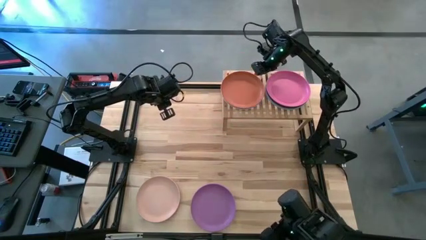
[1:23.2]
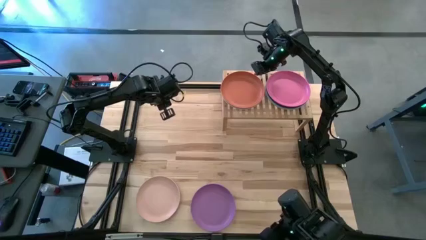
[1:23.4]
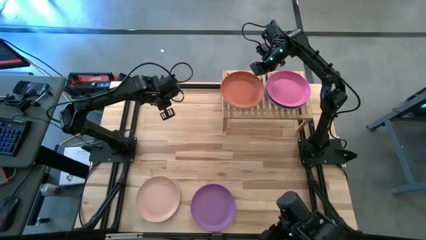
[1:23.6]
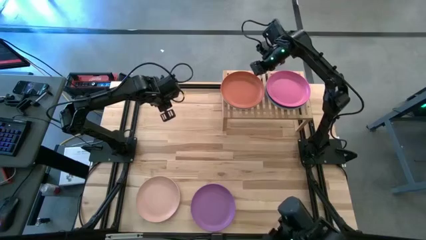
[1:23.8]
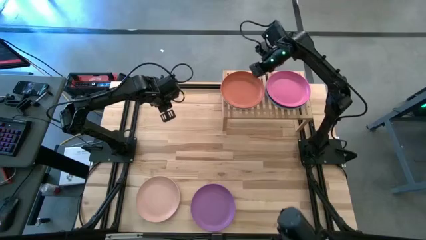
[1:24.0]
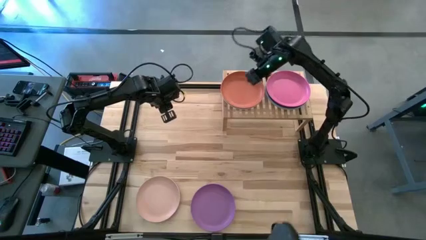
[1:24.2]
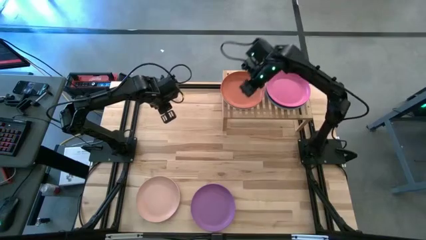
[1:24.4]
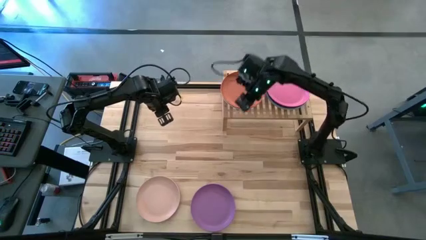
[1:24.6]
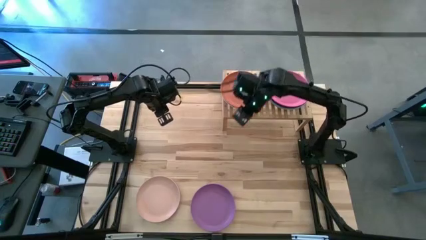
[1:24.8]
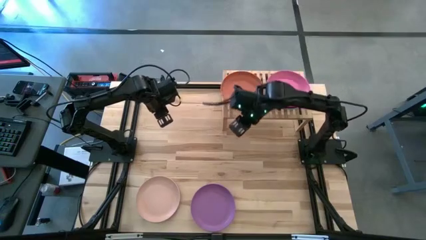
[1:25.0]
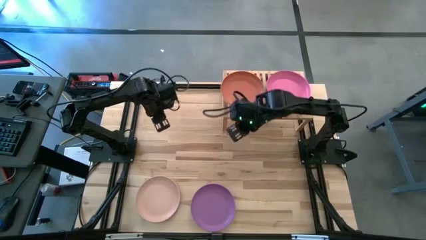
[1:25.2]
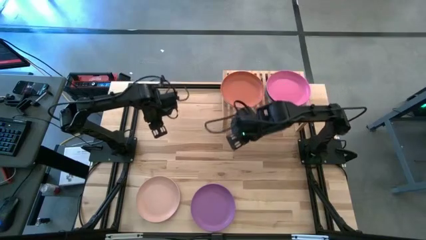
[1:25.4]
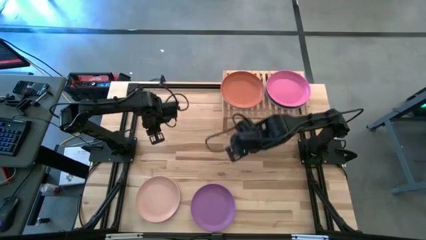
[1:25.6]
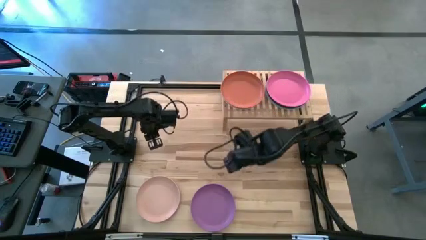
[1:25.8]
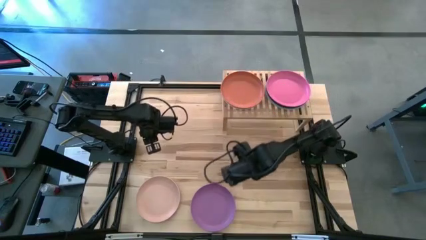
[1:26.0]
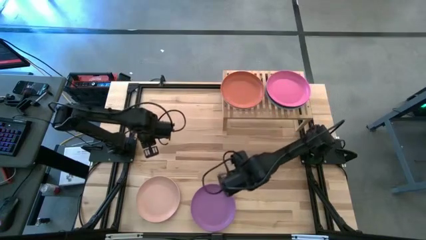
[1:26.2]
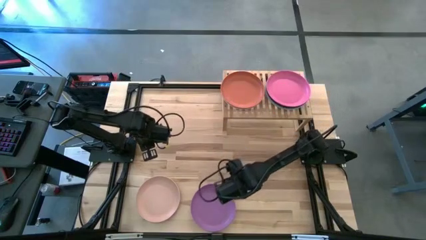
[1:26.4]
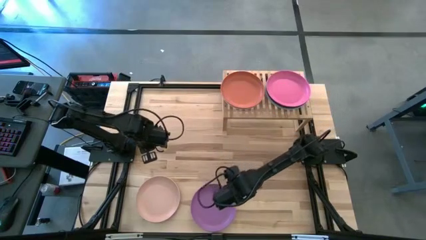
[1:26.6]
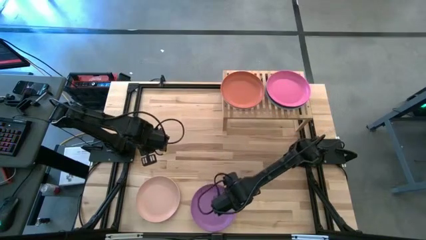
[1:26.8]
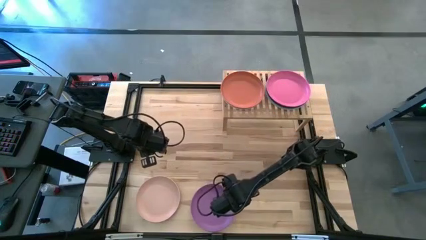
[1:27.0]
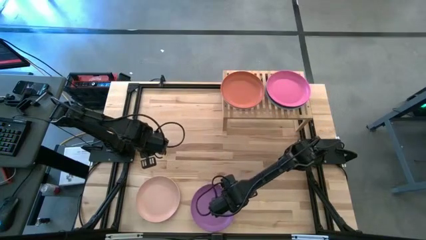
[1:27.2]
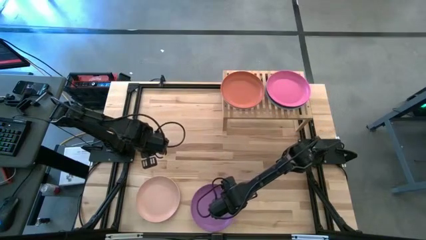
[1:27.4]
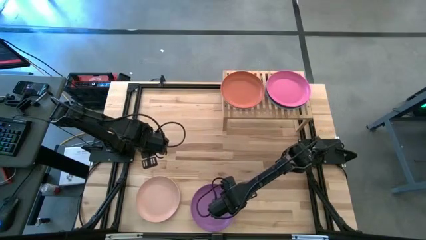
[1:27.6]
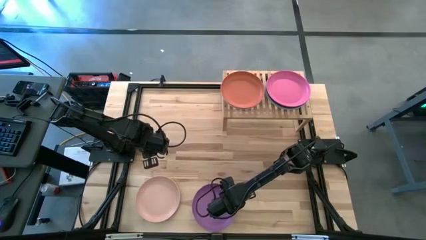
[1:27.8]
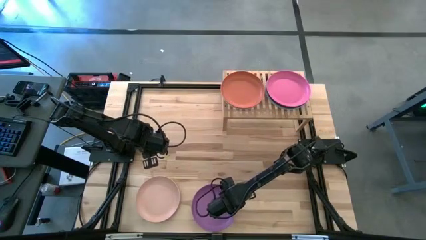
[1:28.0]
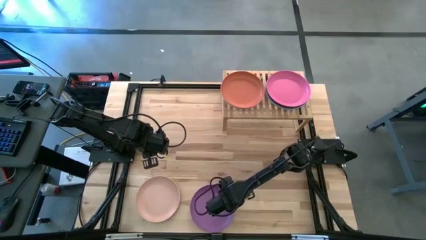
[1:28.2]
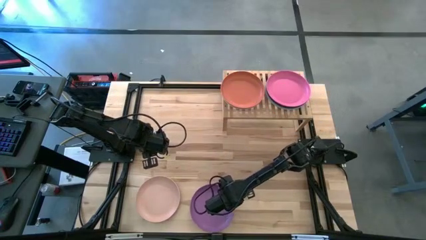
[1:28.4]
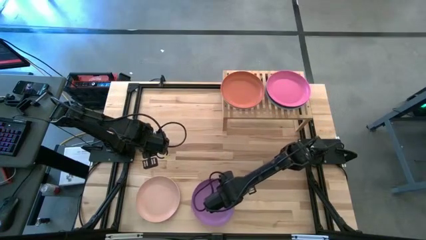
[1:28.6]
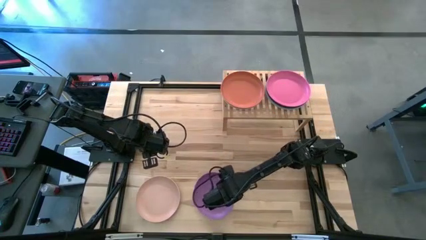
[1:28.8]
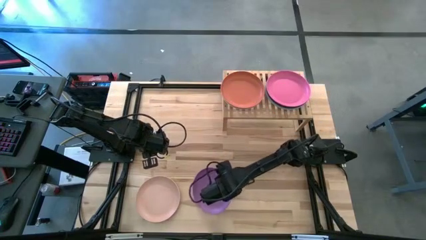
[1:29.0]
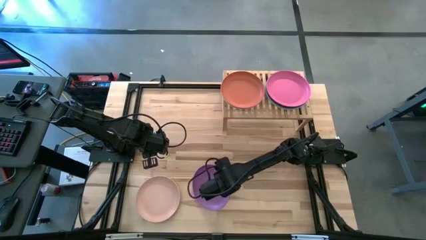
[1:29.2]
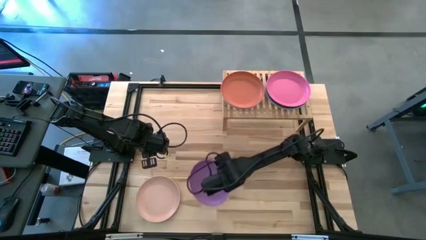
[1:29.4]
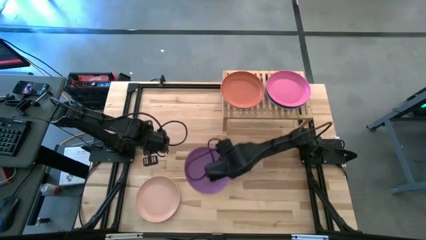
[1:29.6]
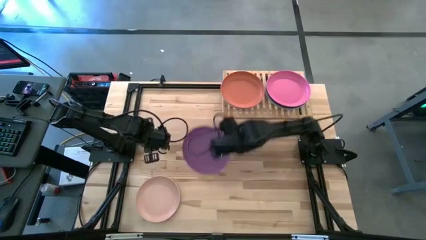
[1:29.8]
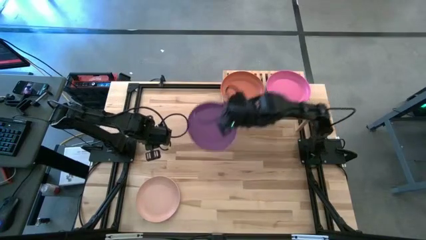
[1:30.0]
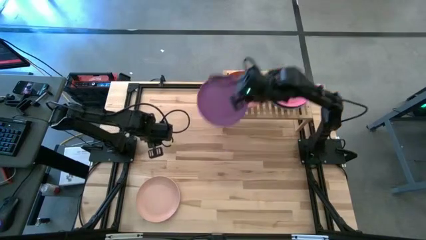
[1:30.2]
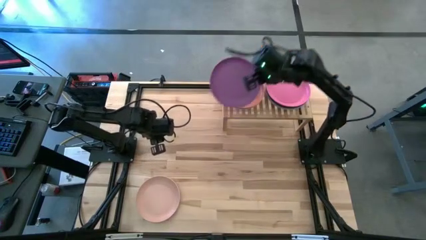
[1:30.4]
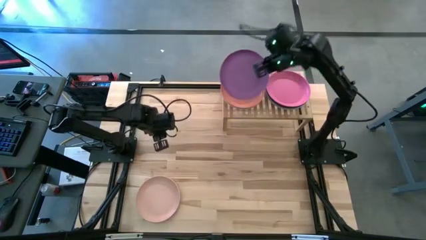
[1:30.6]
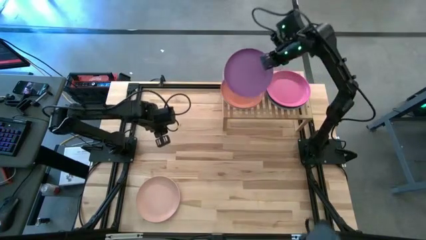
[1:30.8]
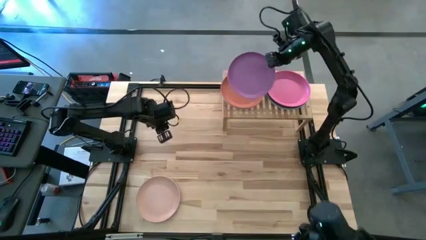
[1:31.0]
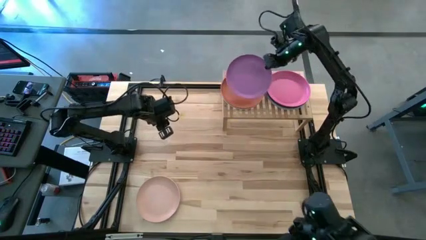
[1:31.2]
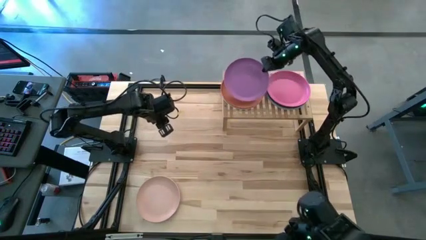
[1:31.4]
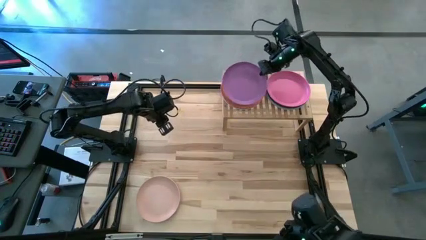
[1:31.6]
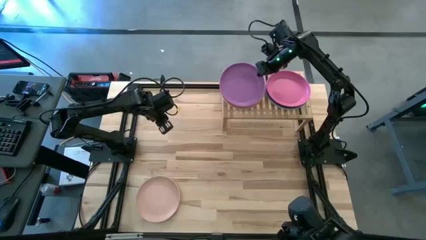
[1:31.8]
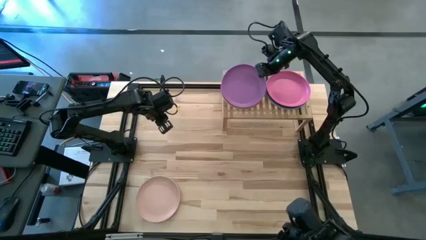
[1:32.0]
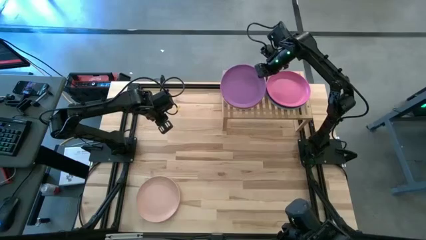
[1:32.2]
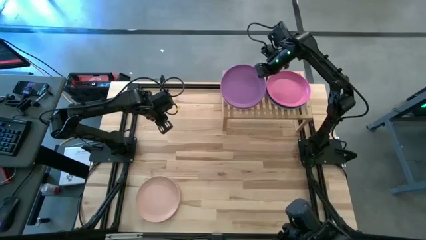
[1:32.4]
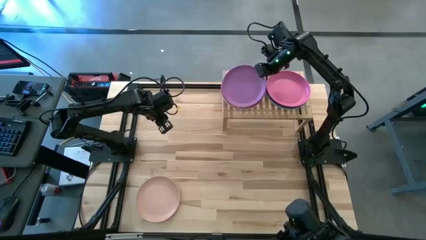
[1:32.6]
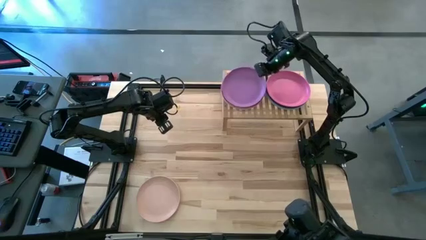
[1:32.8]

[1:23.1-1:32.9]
Task: Place and stack plates onto a shelf
Stack the purple plate on top of the orange plate on the shelf

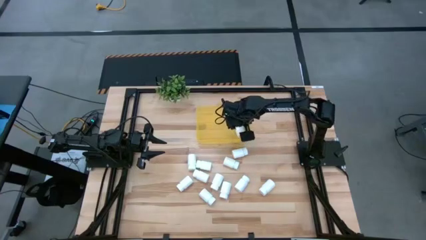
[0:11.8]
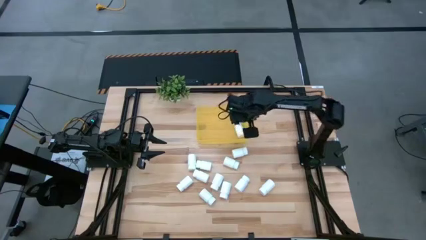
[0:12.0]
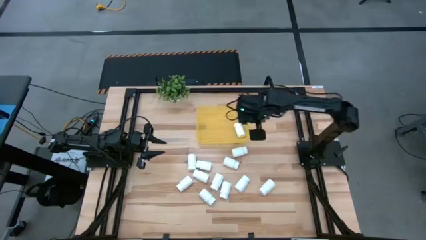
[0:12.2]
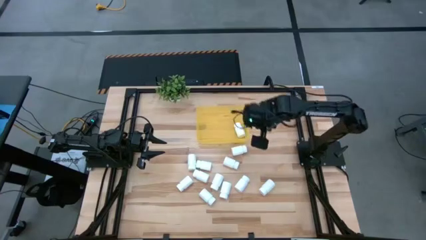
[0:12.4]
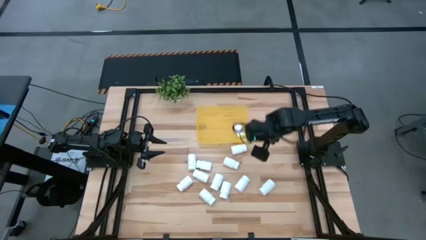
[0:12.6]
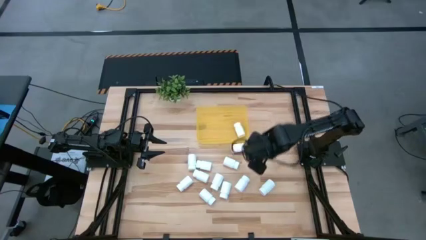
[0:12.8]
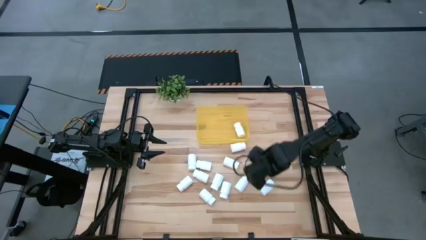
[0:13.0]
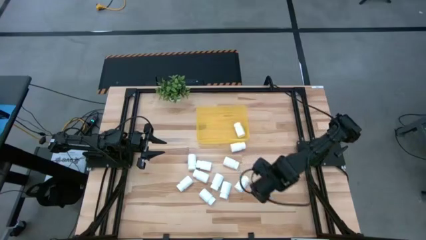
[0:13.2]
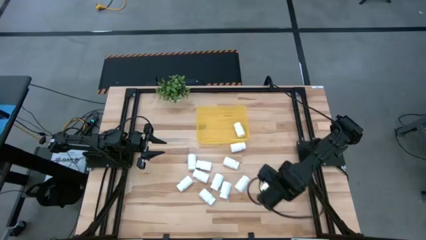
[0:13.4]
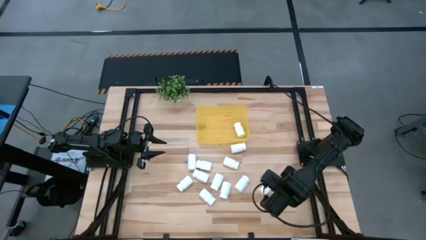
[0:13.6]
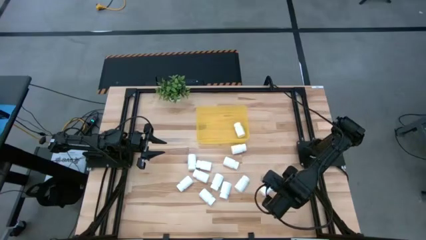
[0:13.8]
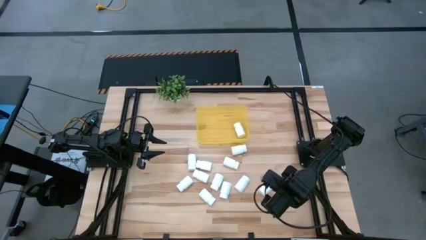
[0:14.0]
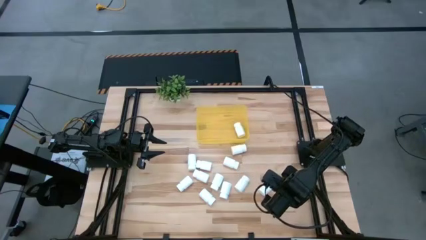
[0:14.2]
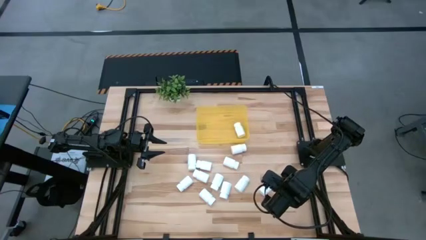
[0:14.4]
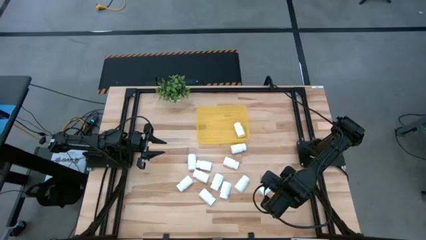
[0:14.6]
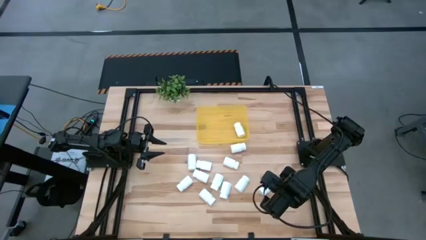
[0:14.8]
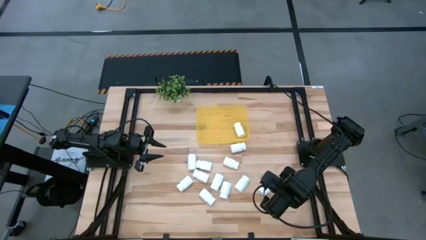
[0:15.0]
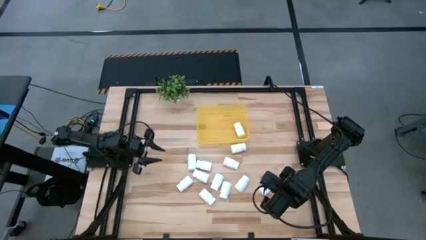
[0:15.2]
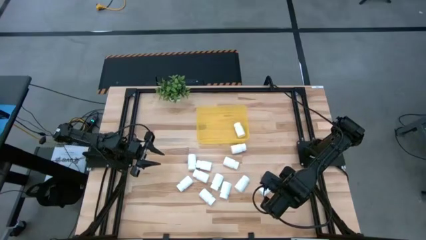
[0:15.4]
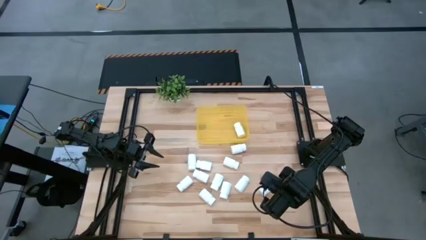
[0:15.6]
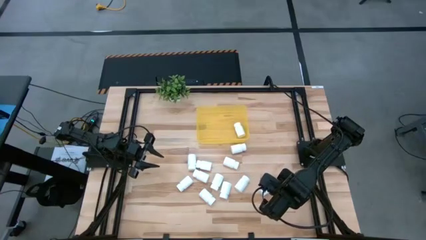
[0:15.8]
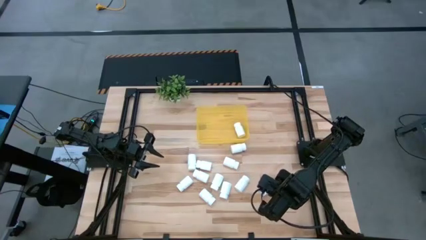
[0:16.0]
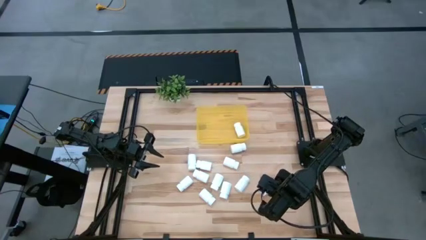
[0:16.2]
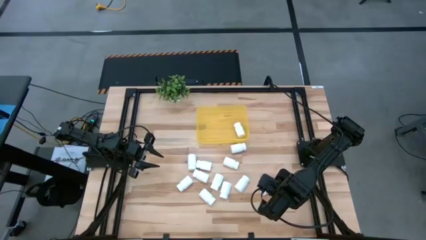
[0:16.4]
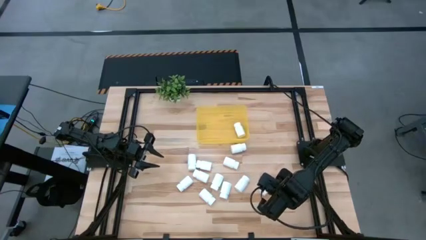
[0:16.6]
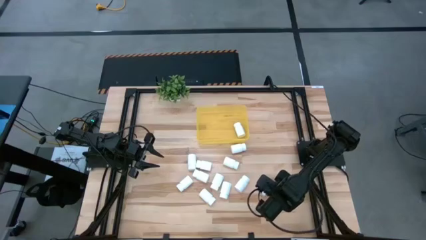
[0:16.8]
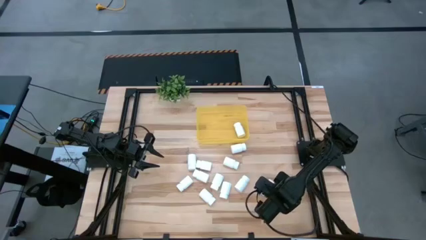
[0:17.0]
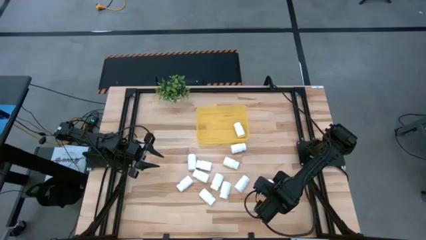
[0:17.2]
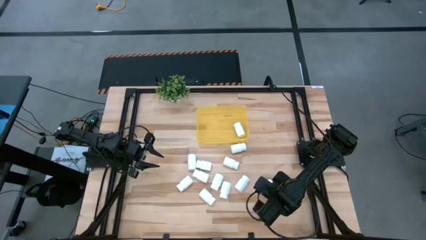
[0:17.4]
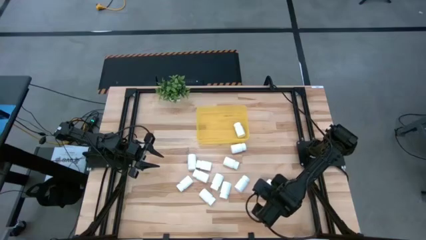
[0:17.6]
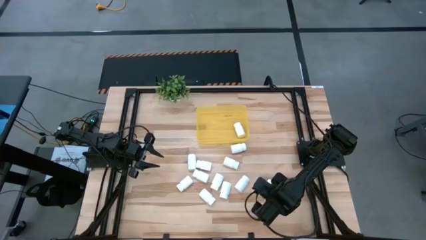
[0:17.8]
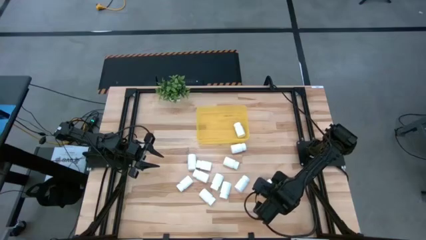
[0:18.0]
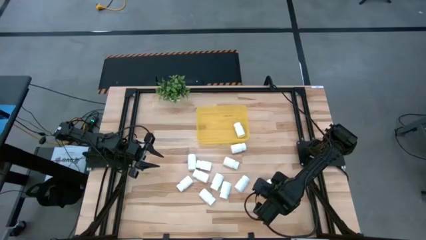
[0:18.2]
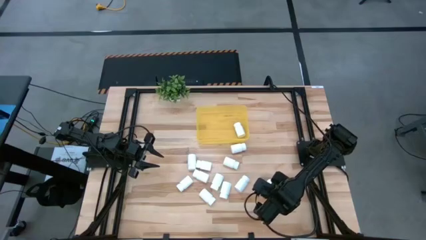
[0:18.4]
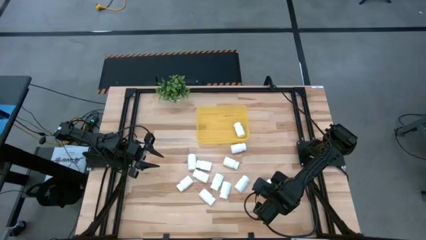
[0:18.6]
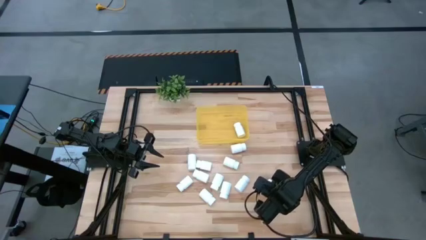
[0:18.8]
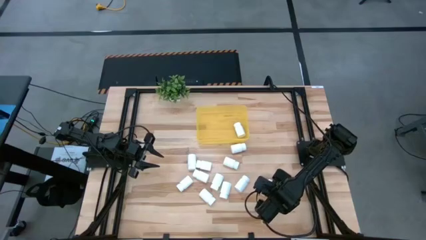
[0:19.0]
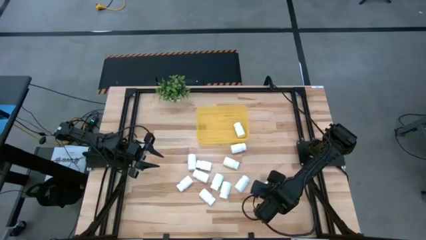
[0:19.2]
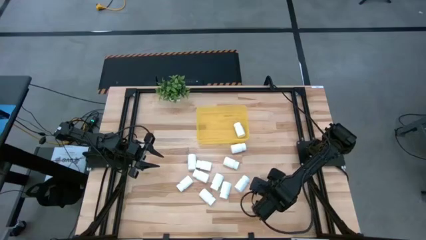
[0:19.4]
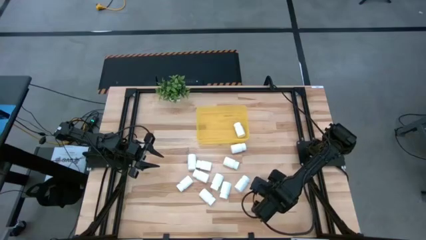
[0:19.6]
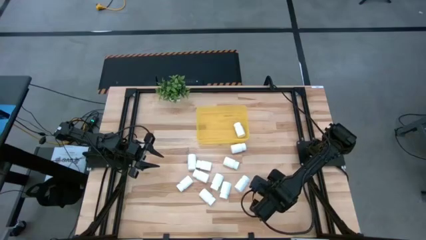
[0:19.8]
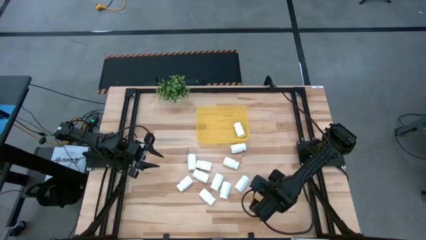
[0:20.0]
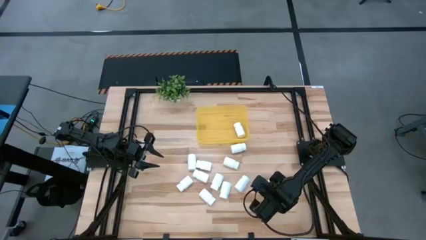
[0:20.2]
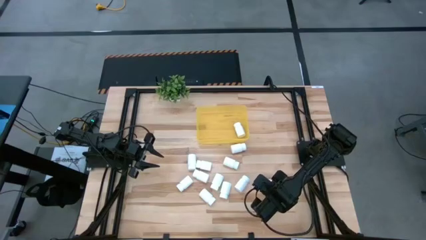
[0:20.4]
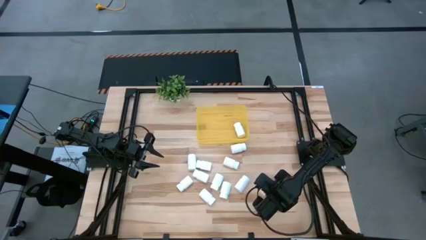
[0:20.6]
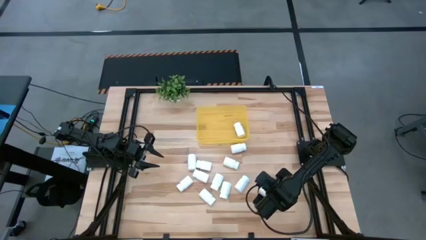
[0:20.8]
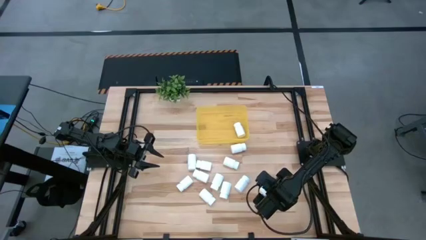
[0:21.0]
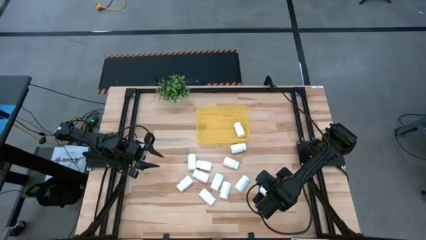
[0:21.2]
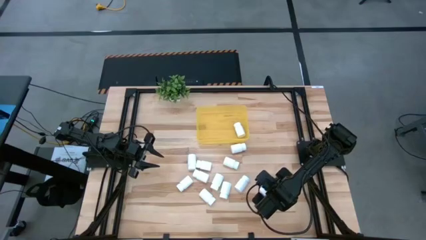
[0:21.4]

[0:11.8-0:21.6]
Task: Pick and place pill bottles into a basket
Put the white pill bottle into the yellow bin
